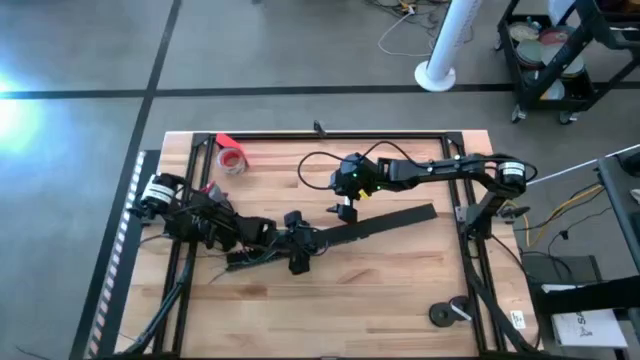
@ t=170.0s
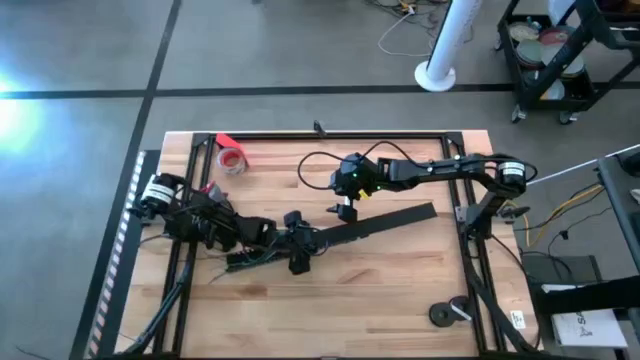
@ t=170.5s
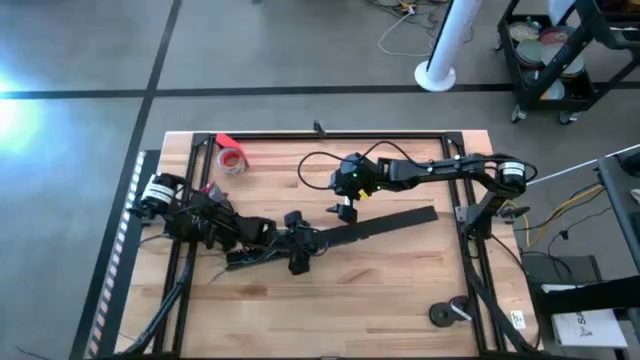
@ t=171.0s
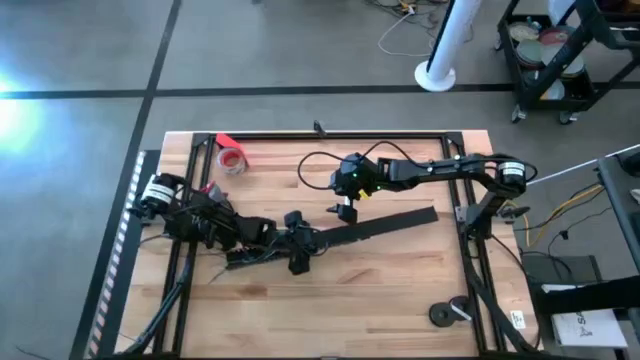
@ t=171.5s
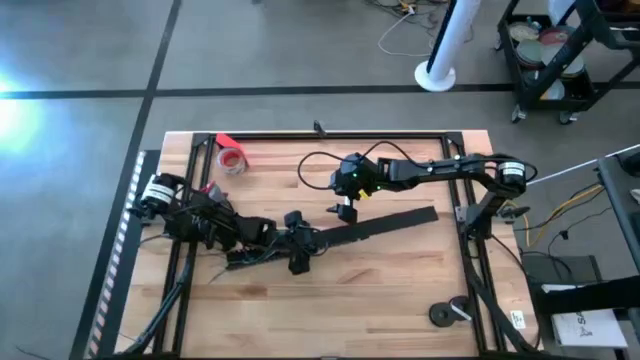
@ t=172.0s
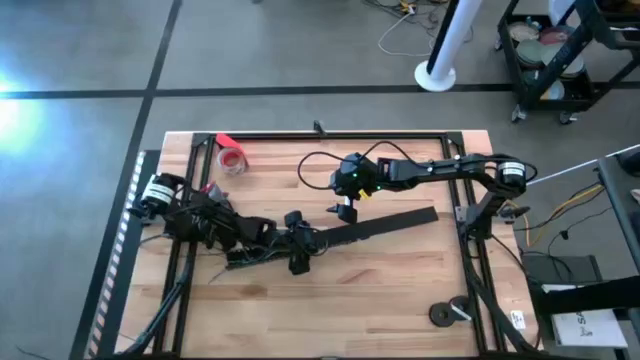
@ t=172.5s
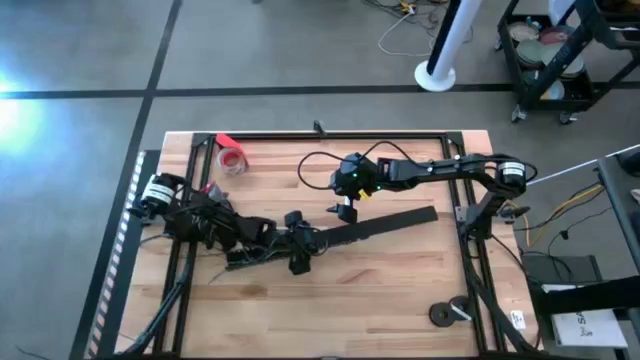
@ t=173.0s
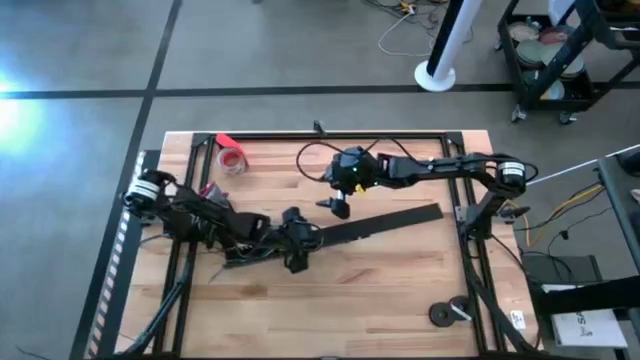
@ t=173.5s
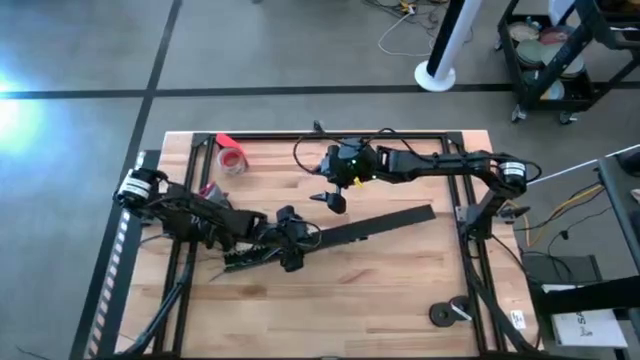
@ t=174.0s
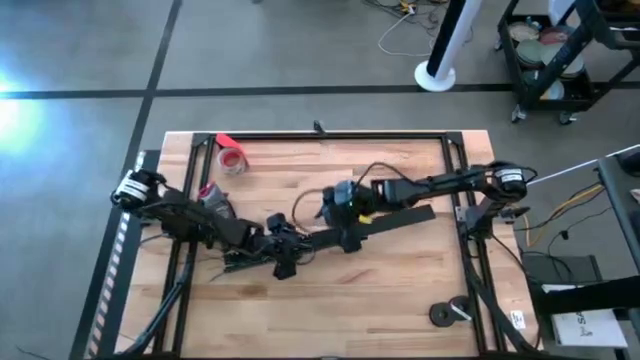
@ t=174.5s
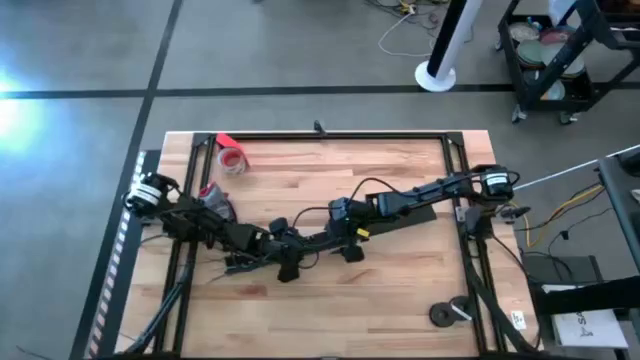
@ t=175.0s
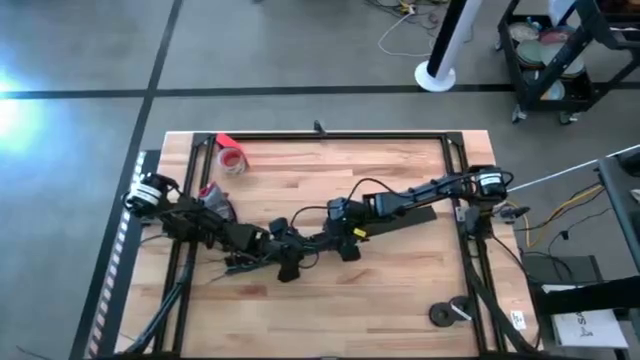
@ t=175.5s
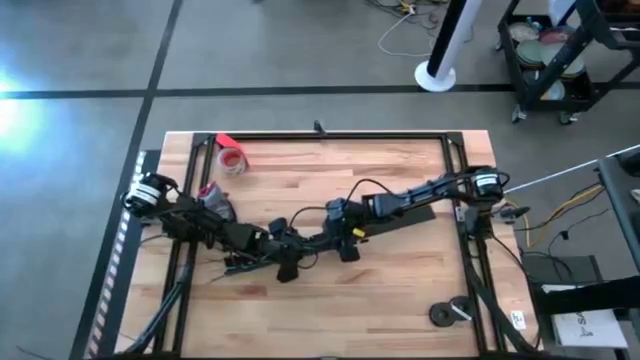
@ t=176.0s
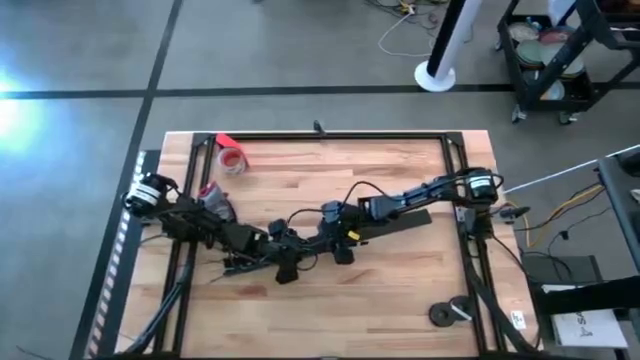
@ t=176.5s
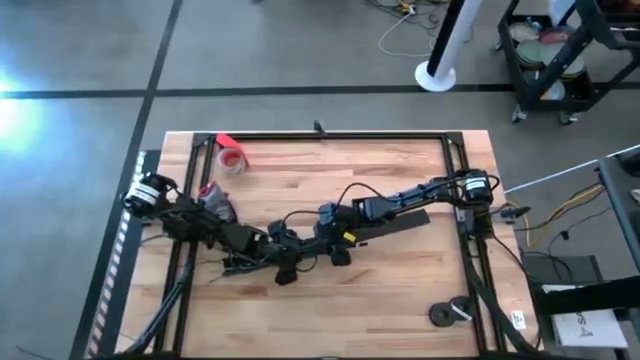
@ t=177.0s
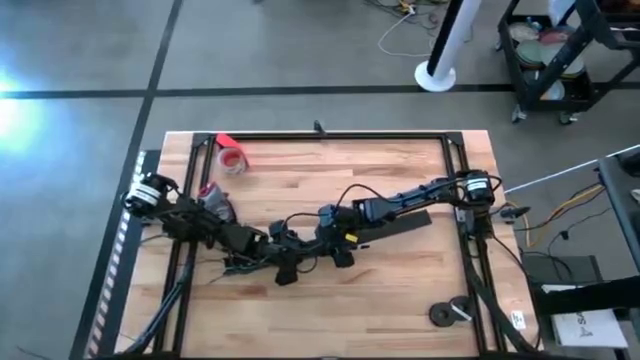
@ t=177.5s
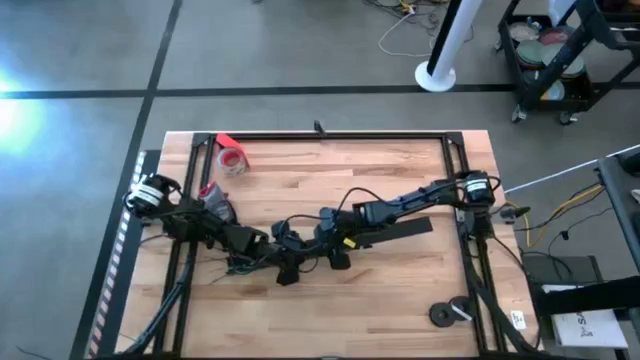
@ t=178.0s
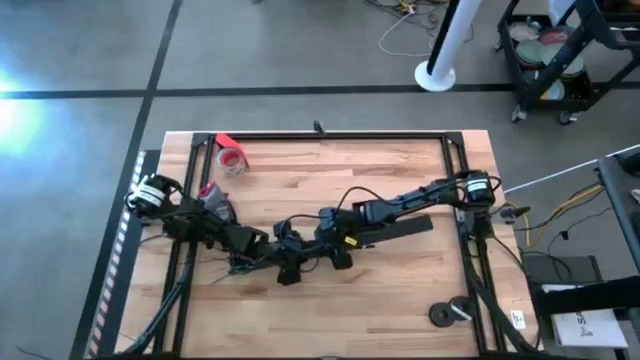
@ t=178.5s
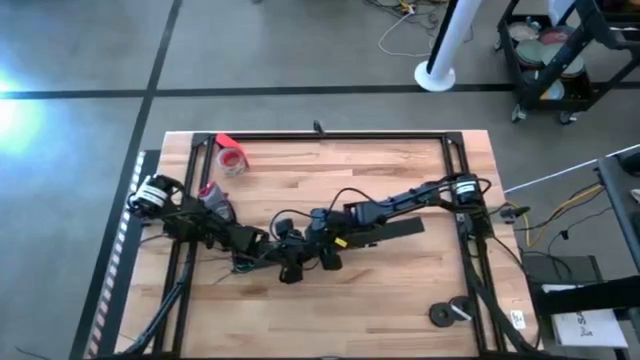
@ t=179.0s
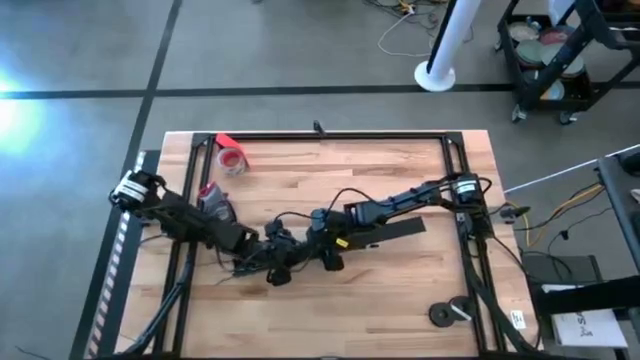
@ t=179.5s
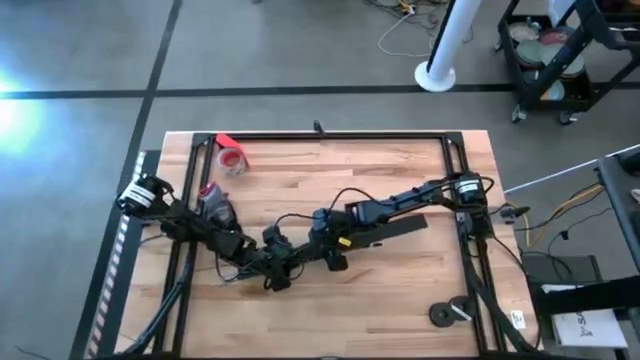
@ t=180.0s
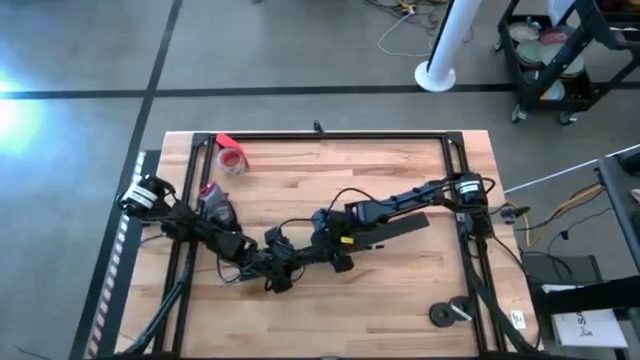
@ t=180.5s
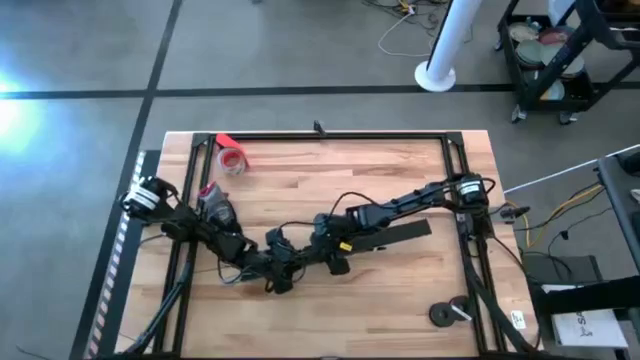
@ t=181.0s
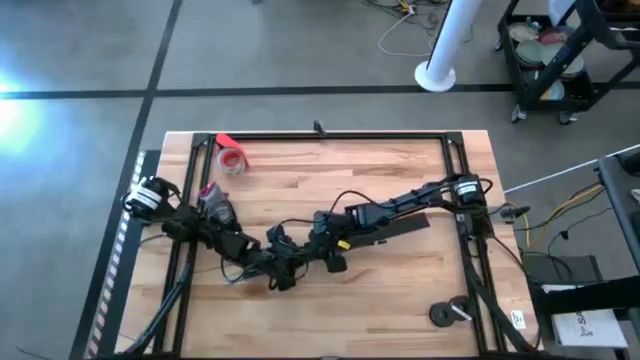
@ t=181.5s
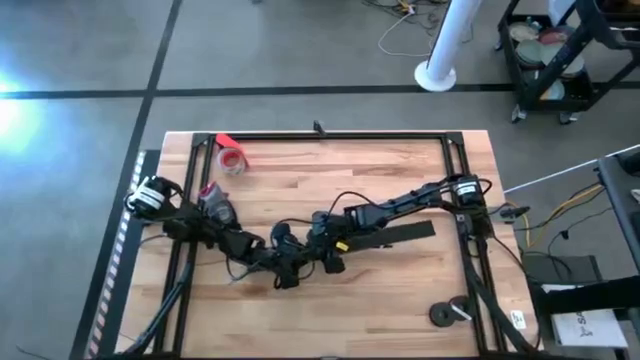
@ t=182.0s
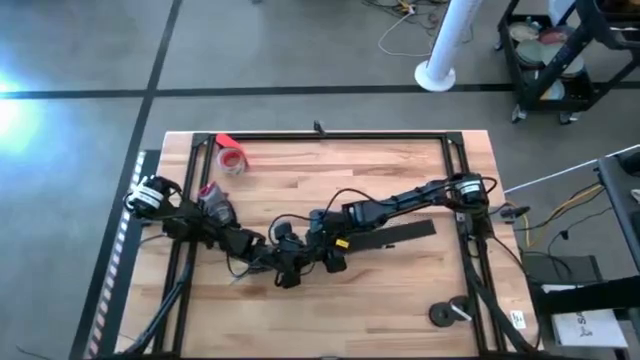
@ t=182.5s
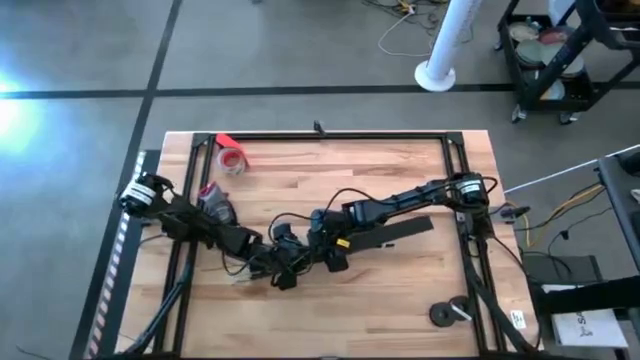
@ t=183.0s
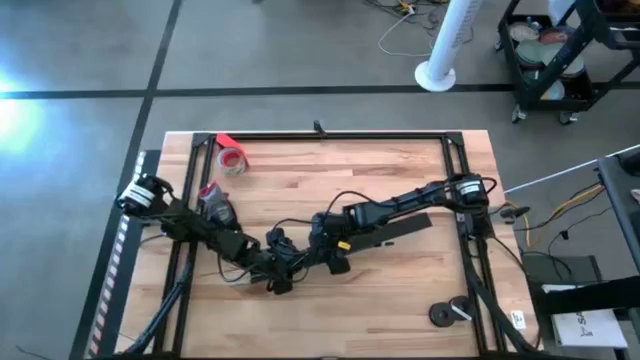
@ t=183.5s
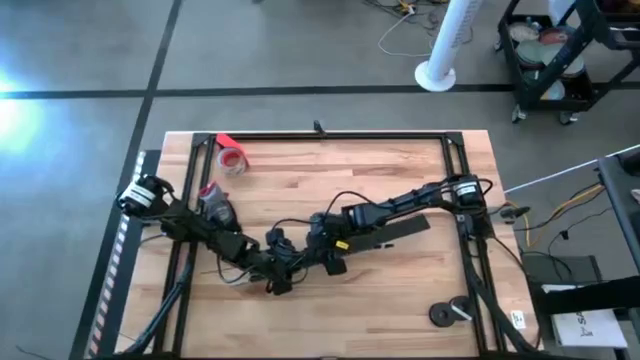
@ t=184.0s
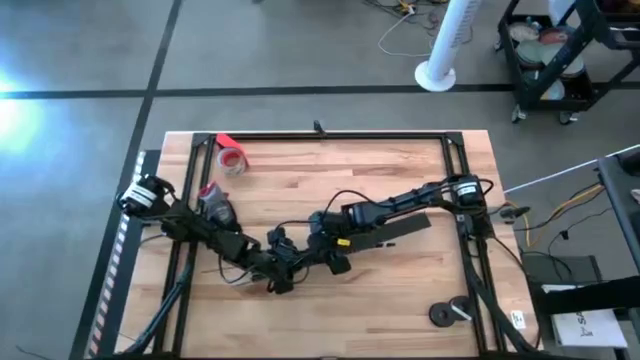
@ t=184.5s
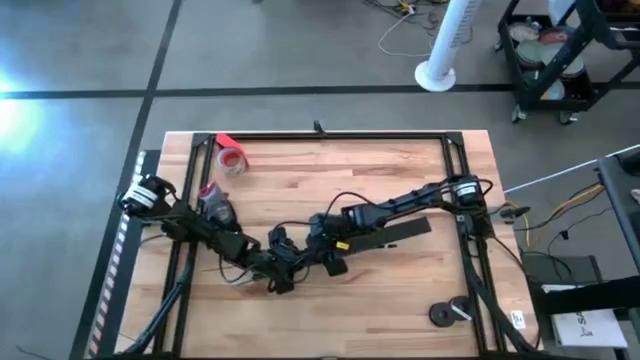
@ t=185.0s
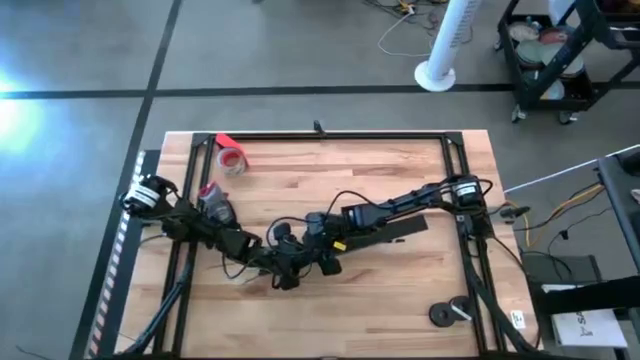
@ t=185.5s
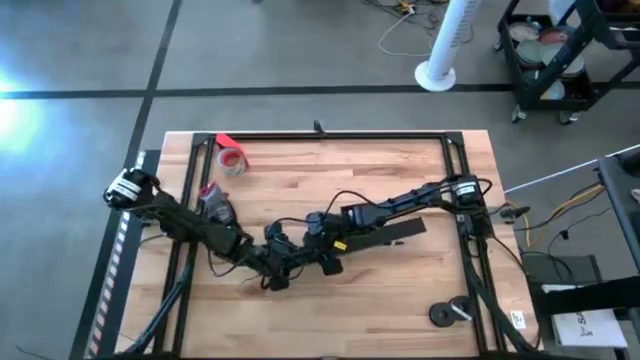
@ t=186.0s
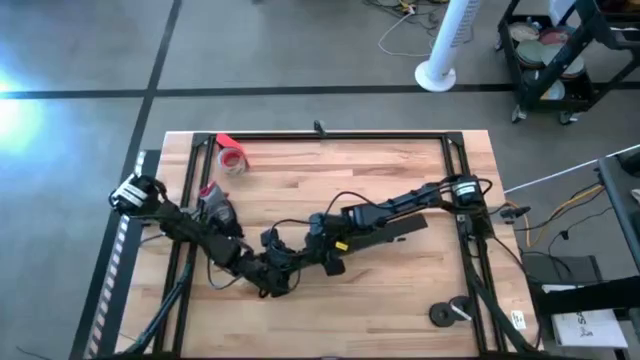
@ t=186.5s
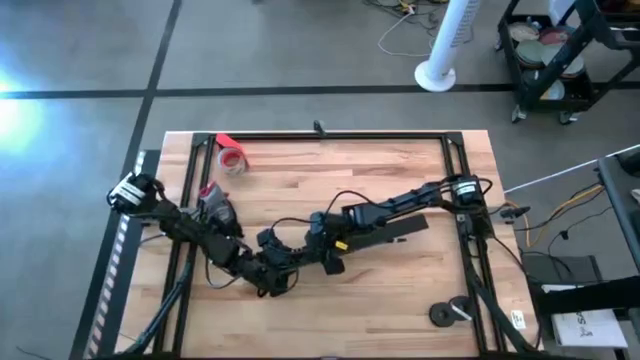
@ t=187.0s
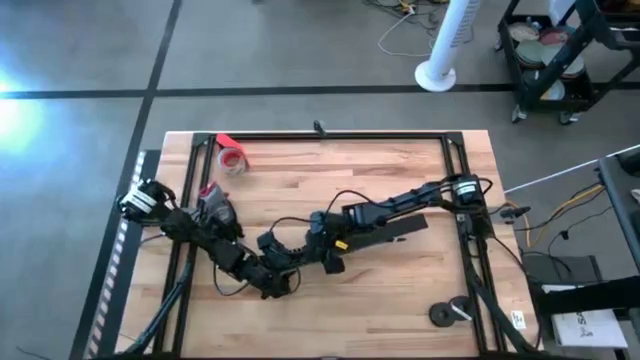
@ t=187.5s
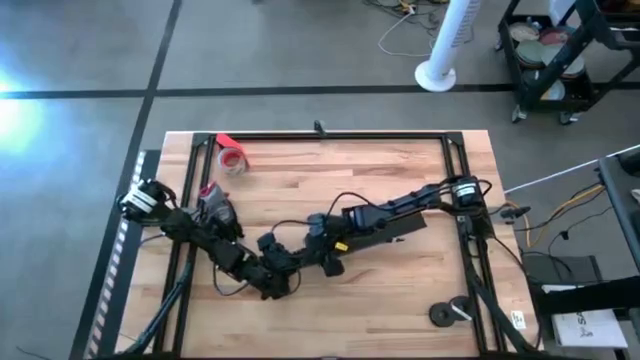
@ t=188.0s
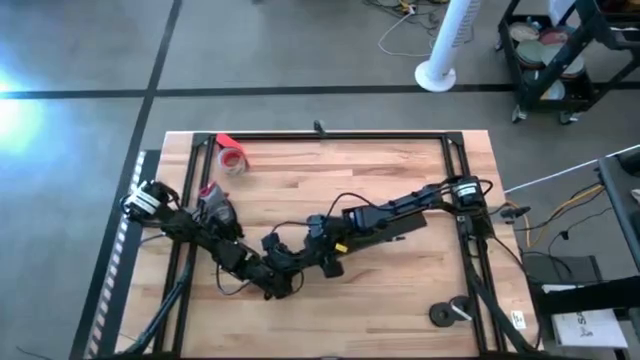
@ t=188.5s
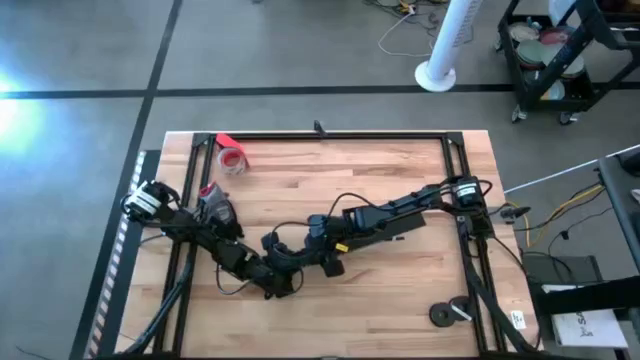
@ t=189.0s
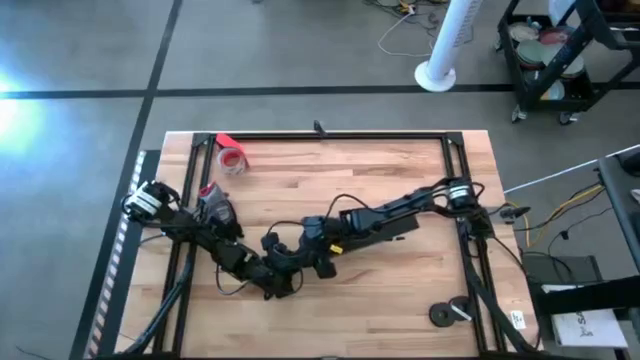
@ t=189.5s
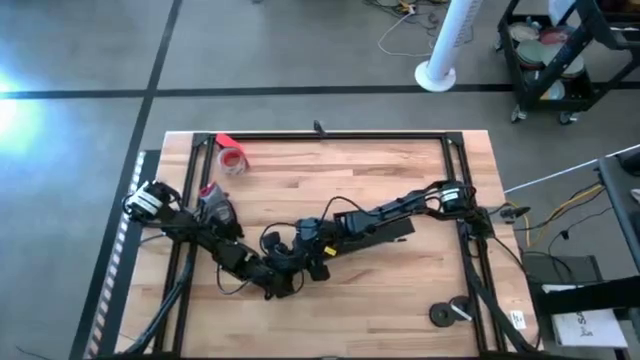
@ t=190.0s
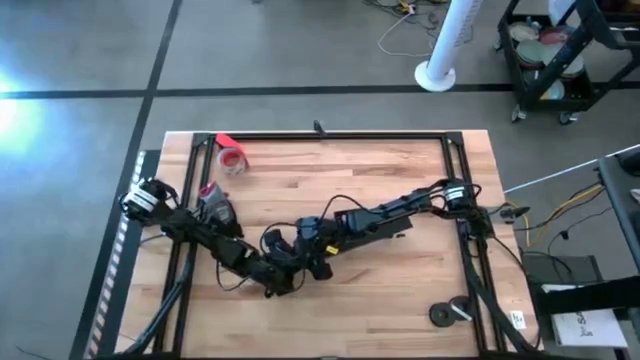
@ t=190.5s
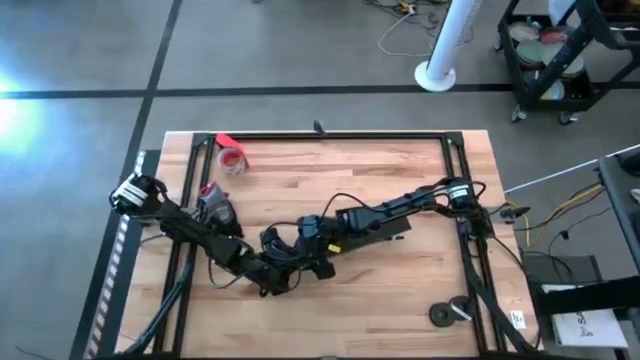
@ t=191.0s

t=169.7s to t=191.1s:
Task: Ziptie cables
Close the black cable duct
